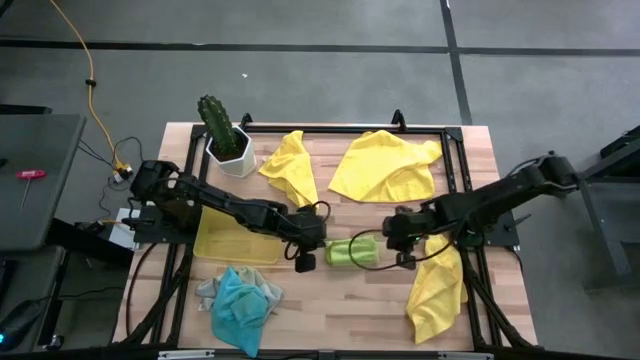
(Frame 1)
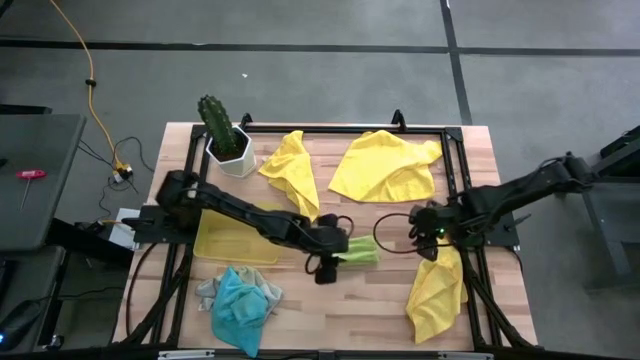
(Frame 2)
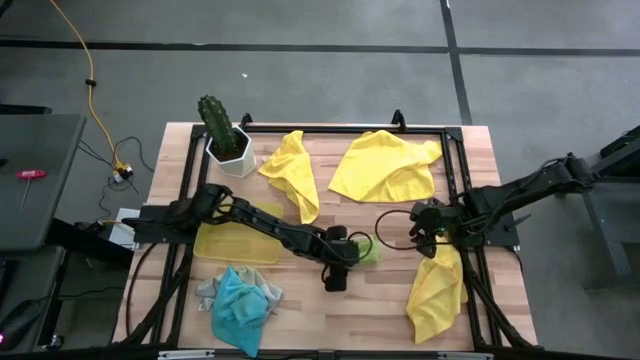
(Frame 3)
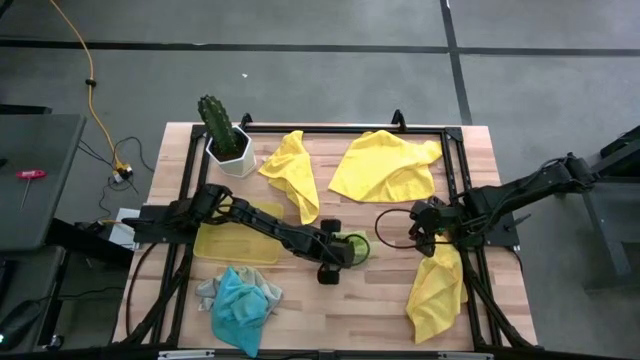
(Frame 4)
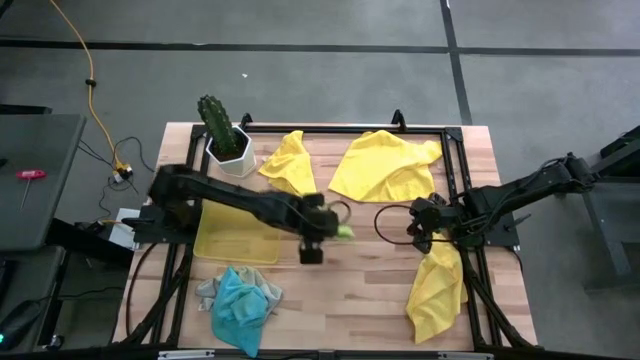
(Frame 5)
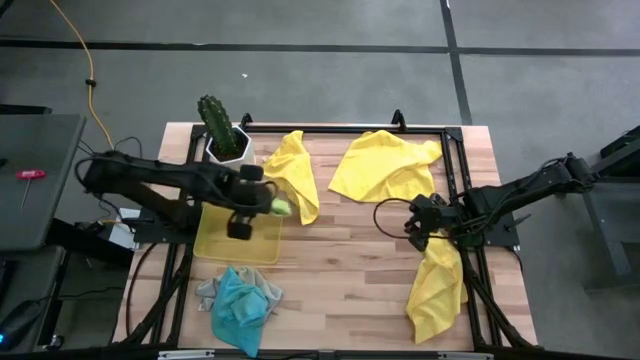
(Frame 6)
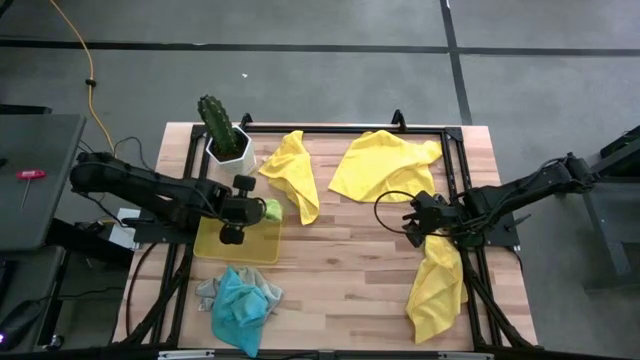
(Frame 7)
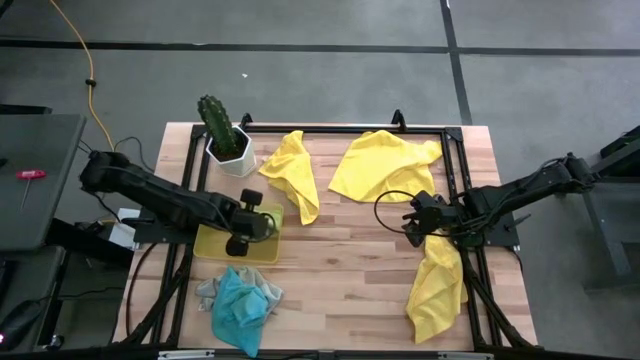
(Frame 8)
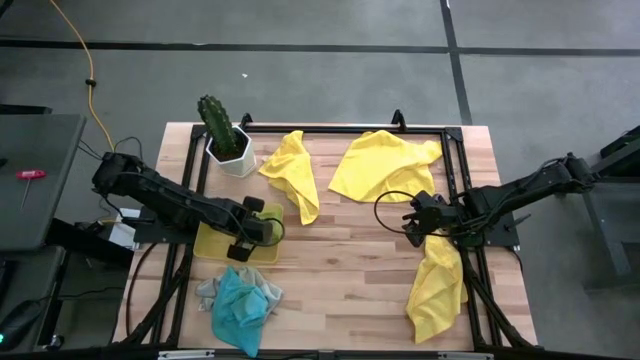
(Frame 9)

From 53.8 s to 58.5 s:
Task: Fold microfiber towels
Put the green microfiber towel into the yellow bin

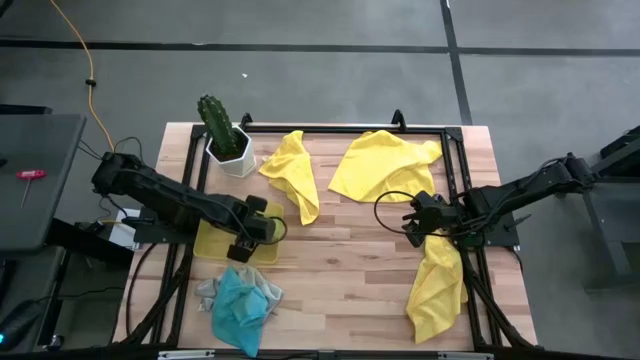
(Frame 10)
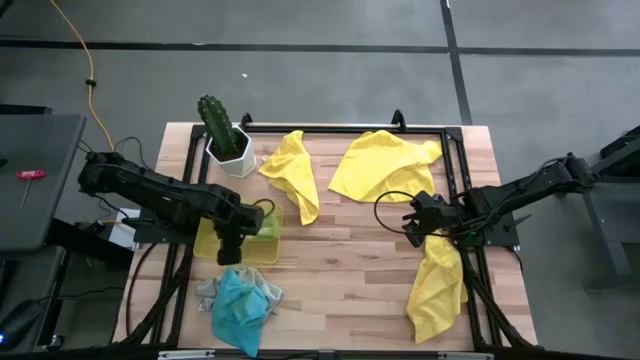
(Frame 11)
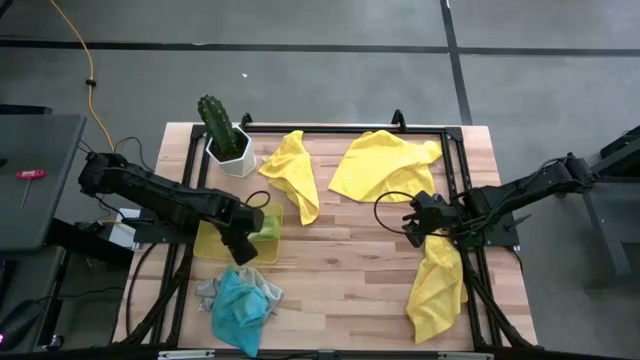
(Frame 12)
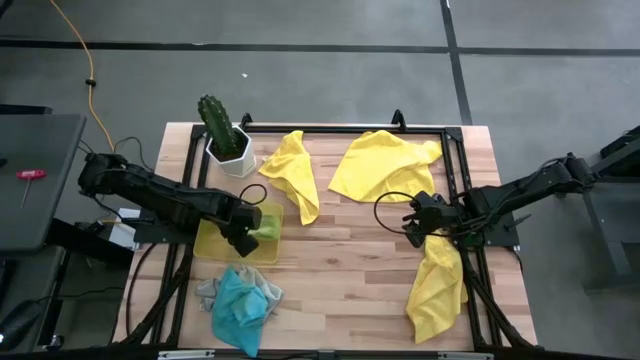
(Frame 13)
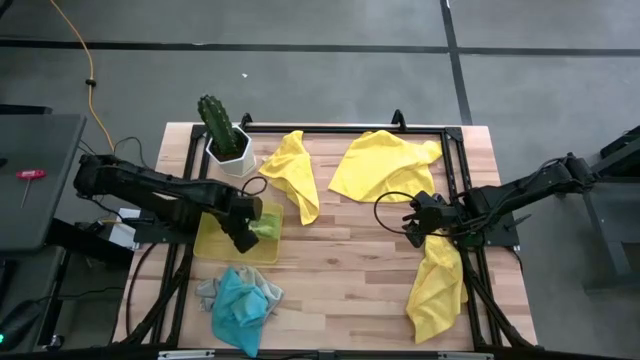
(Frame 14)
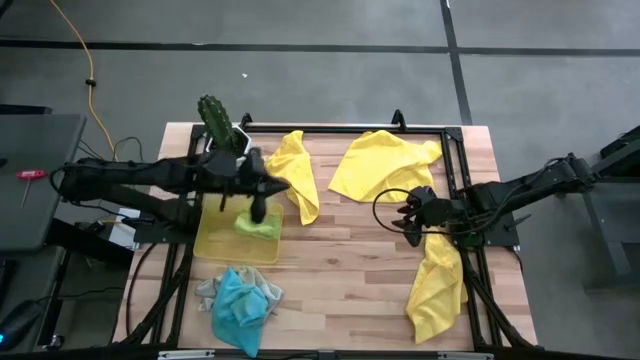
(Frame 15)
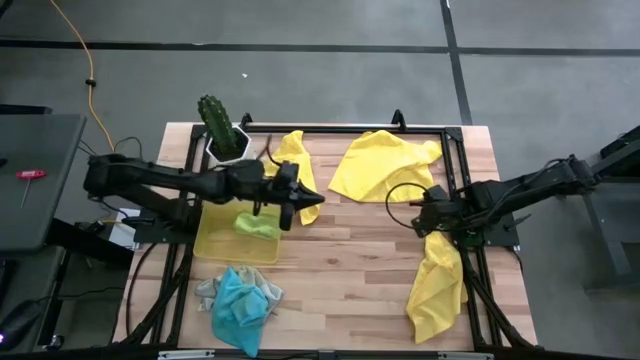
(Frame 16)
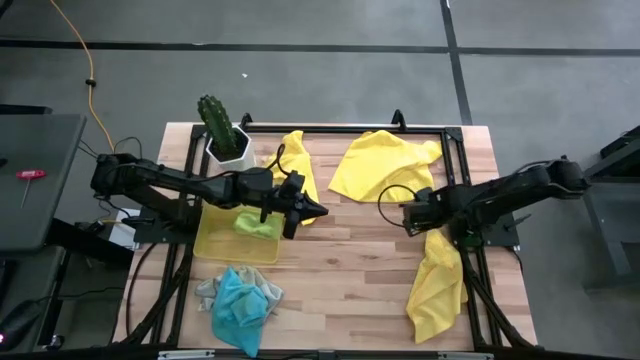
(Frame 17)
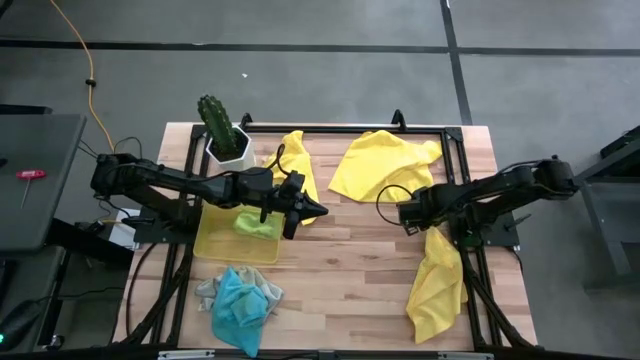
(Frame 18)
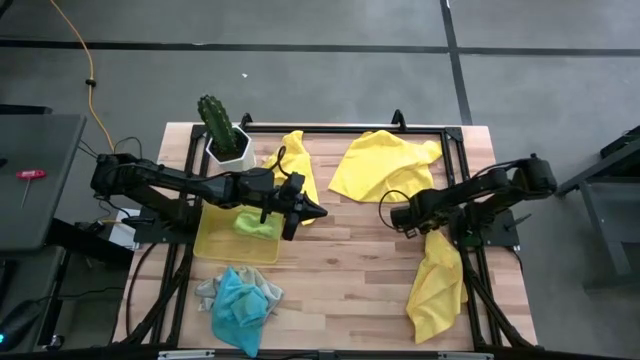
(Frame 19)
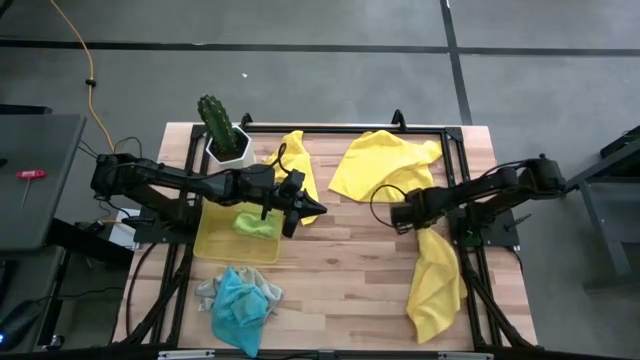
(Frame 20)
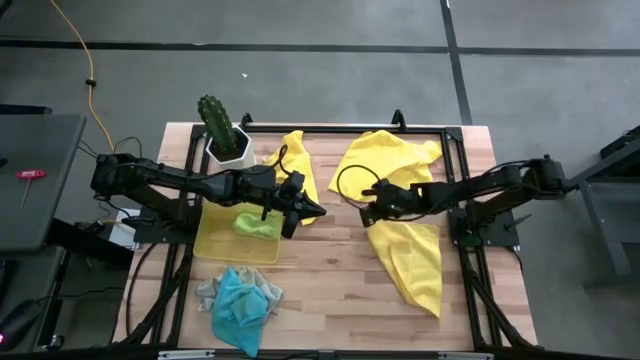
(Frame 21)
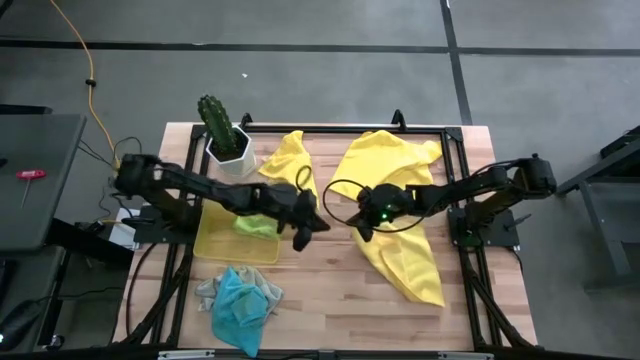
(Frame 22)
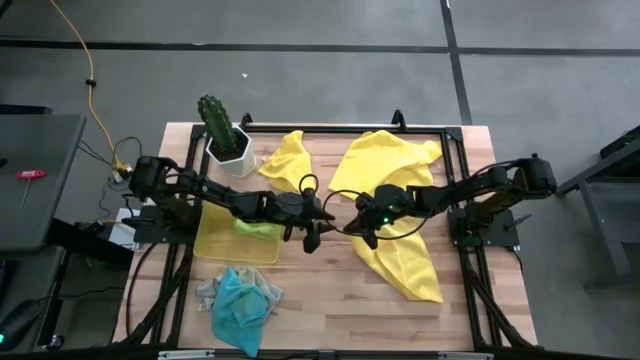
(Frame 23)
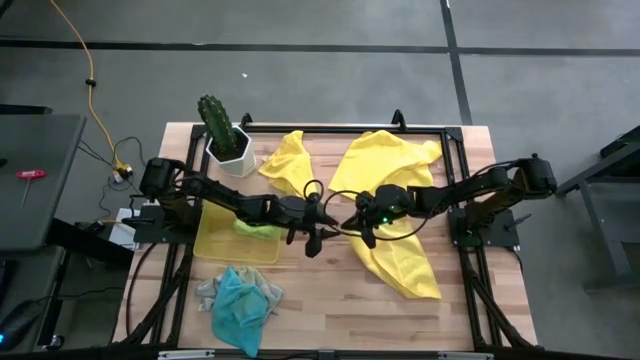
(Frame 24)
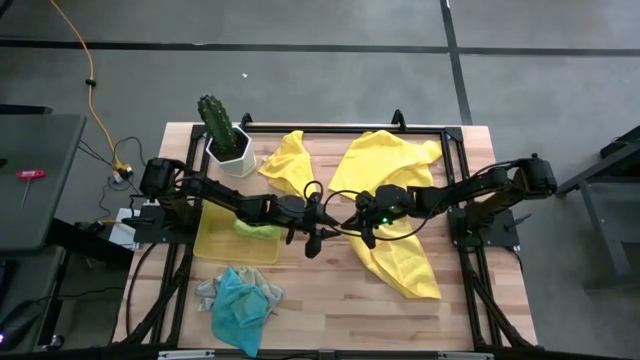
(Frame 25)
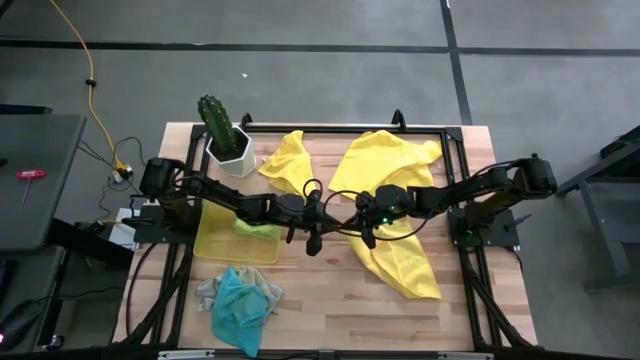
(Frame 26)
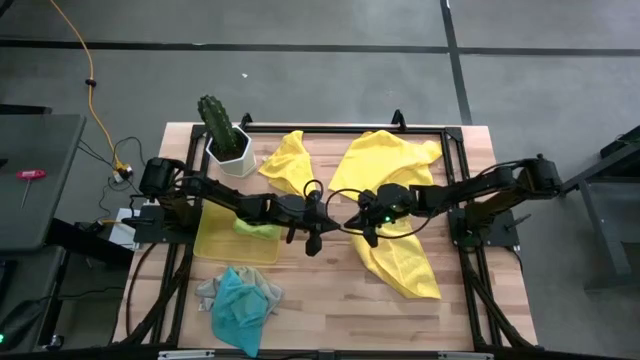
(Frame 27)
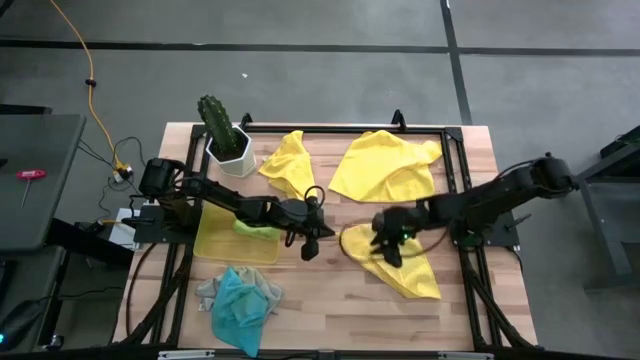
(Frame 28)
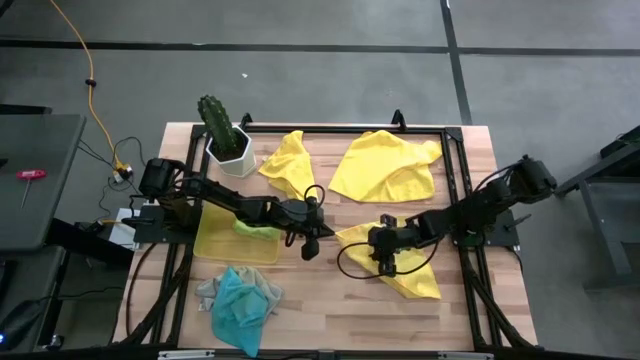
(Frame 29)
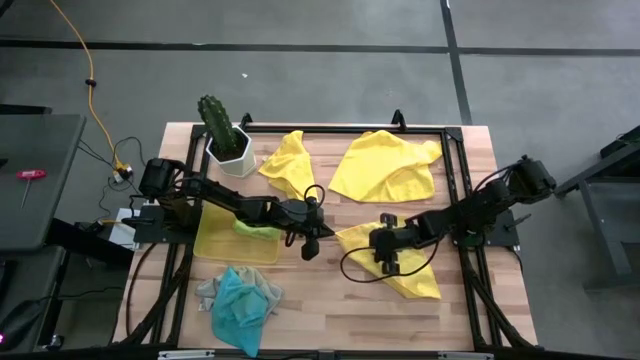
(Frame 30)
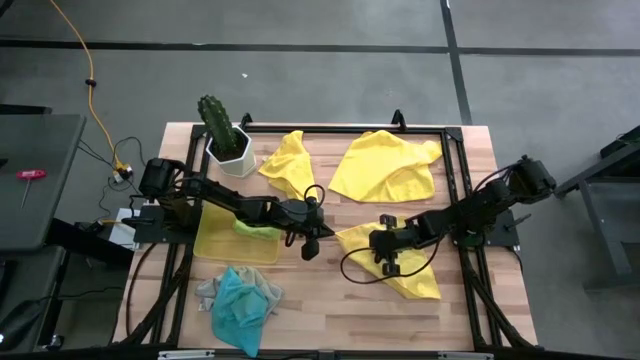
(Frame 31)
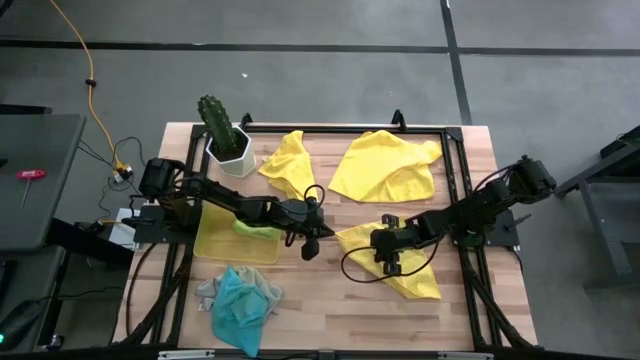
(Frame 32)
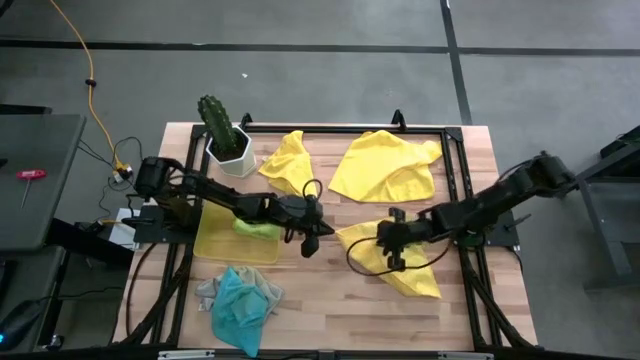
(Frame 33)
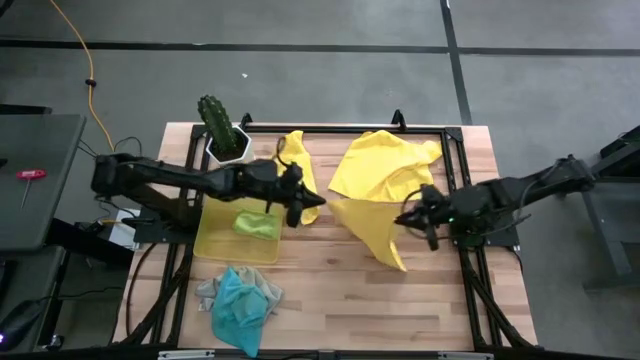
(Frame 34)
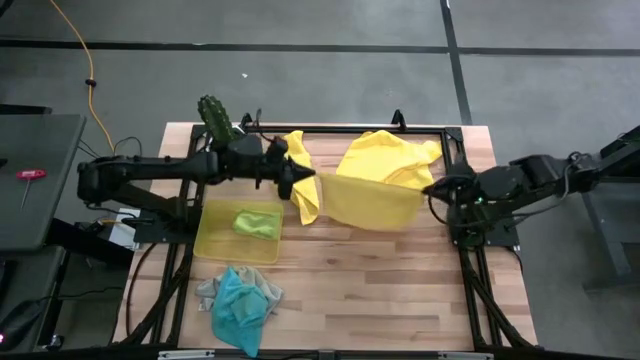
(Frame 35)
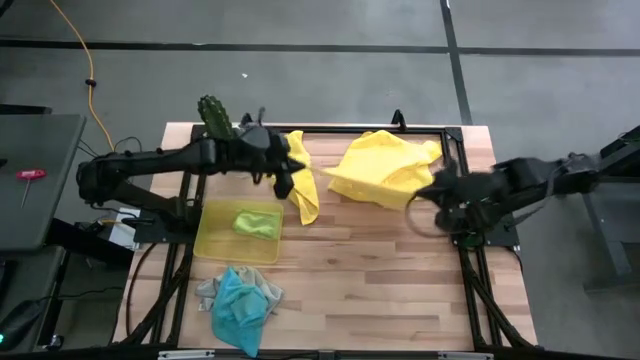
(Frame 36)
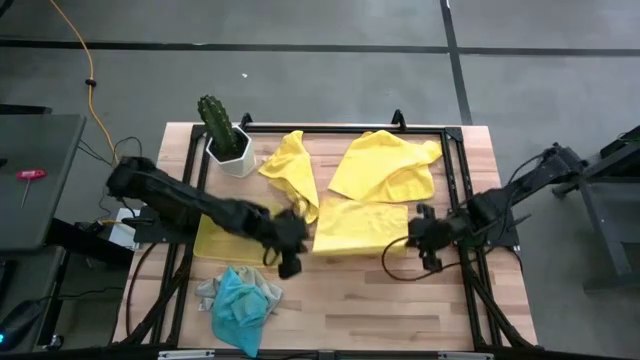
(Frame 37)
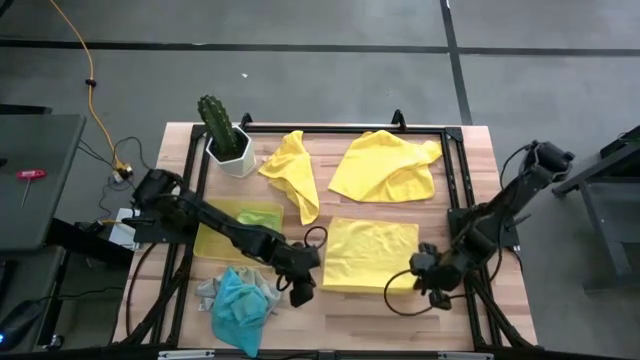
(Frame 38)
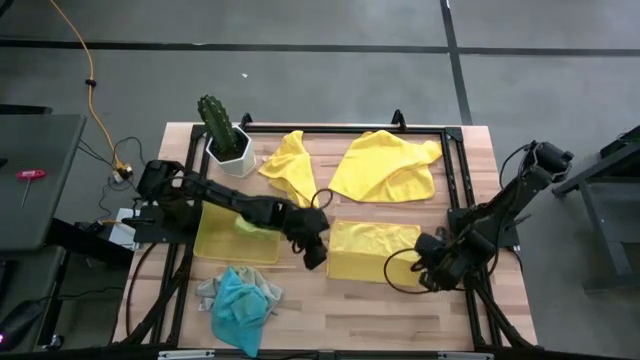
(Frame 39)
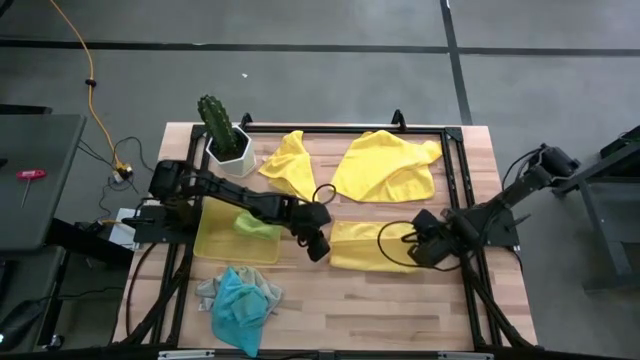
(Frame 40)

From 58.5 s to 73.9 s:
Fold the bottom yellow microfiber towel
